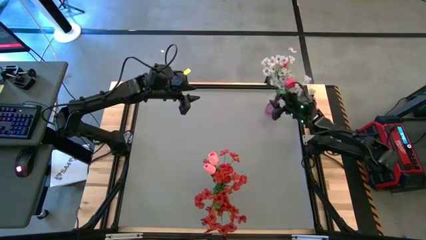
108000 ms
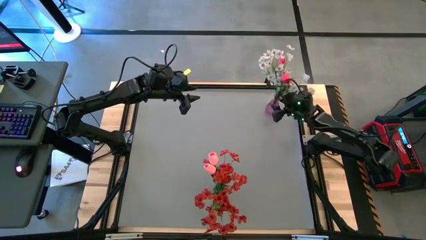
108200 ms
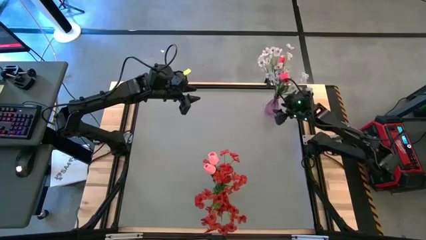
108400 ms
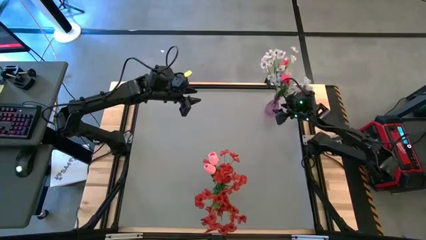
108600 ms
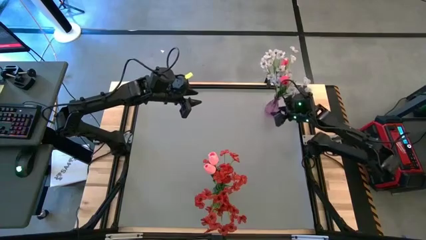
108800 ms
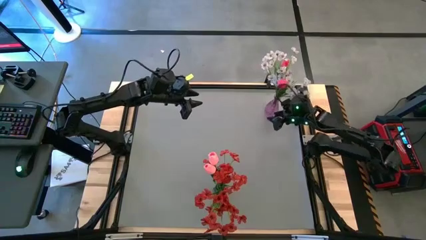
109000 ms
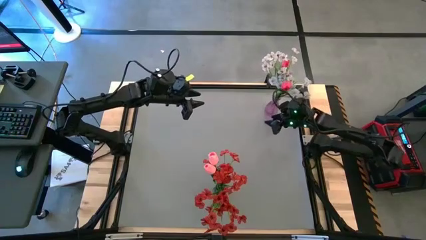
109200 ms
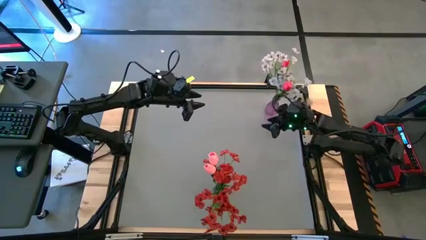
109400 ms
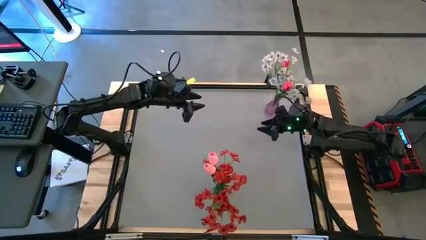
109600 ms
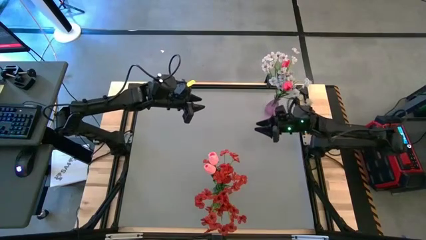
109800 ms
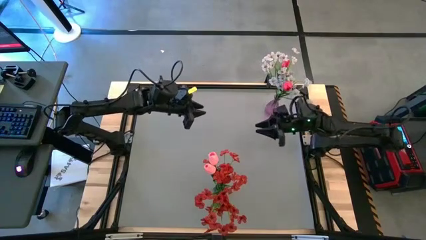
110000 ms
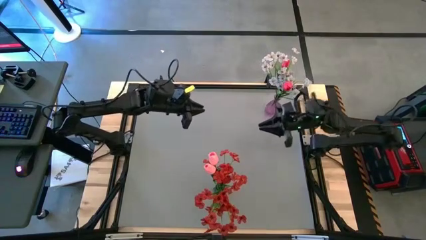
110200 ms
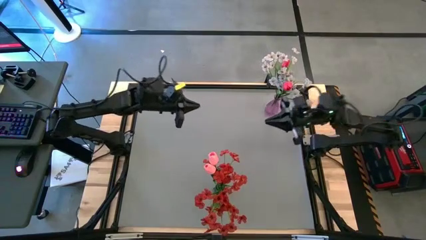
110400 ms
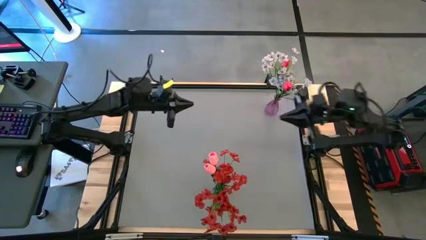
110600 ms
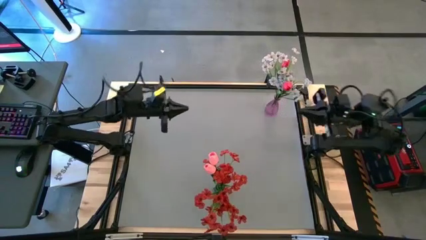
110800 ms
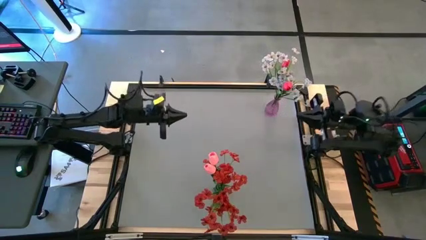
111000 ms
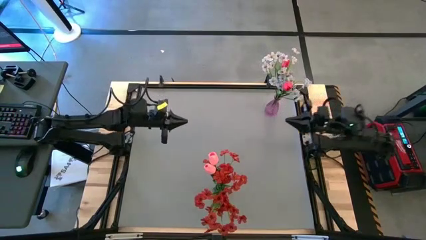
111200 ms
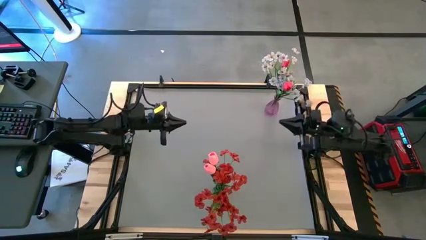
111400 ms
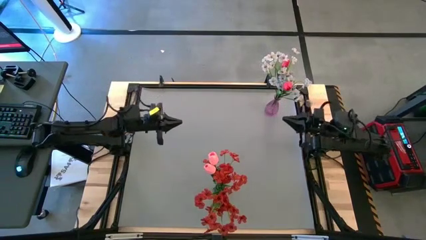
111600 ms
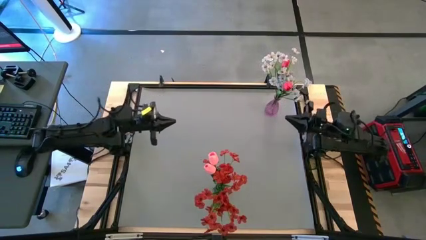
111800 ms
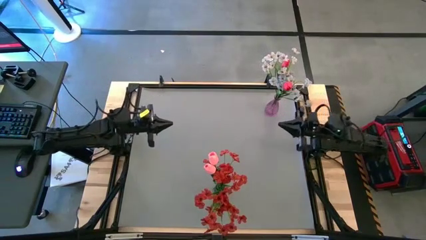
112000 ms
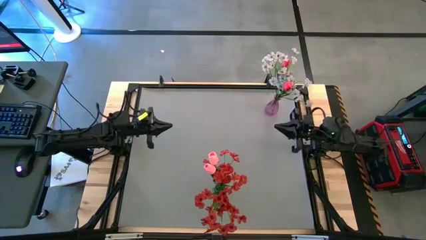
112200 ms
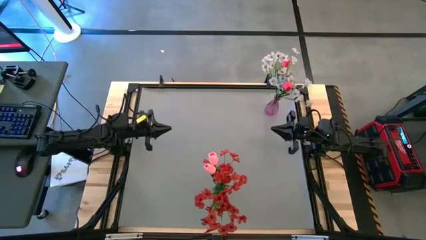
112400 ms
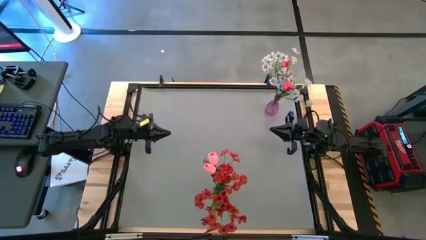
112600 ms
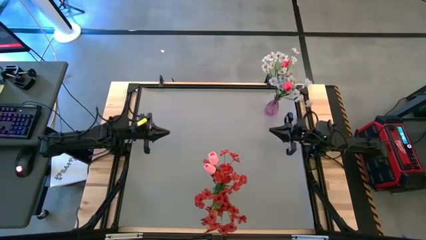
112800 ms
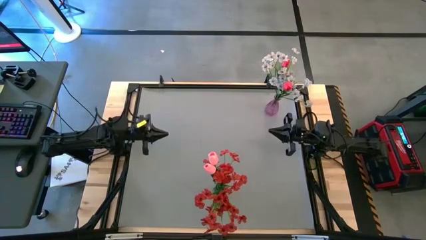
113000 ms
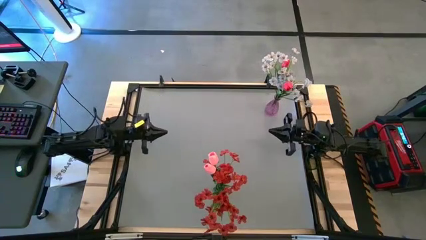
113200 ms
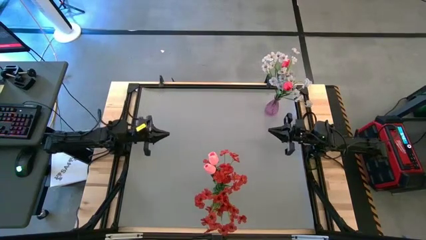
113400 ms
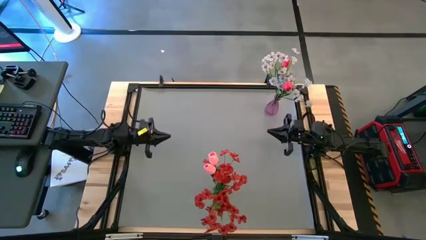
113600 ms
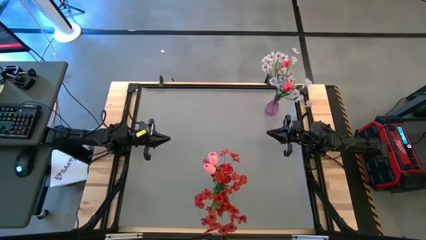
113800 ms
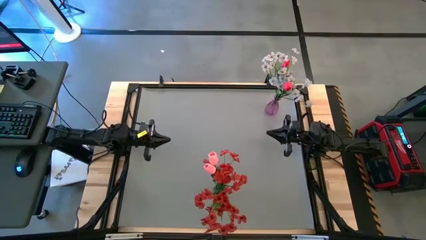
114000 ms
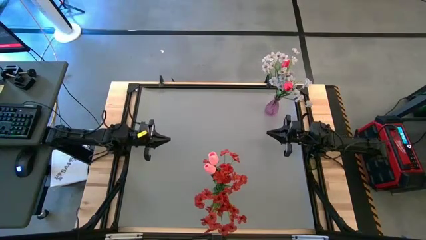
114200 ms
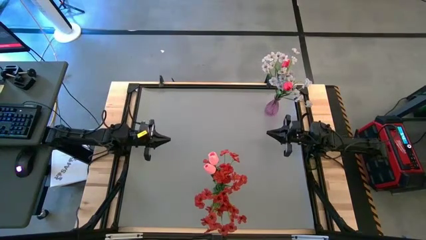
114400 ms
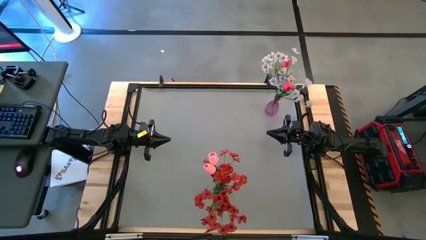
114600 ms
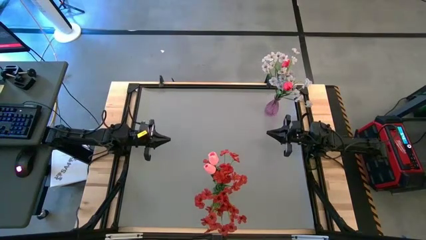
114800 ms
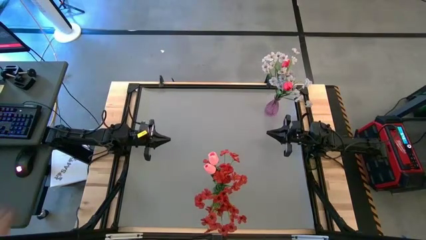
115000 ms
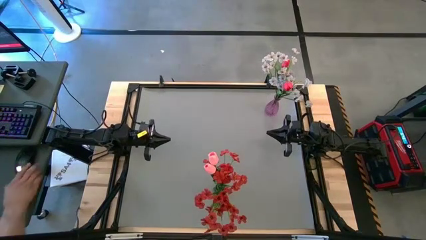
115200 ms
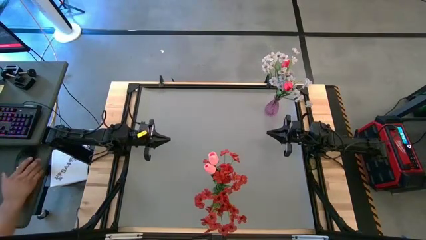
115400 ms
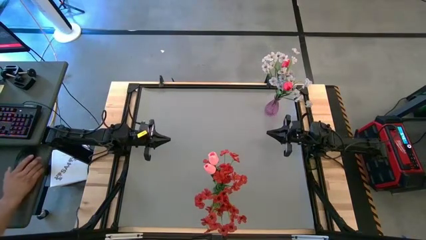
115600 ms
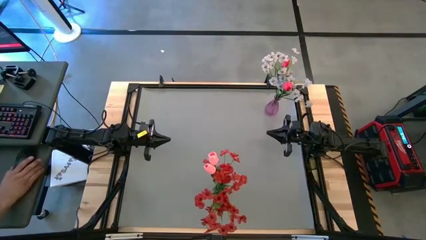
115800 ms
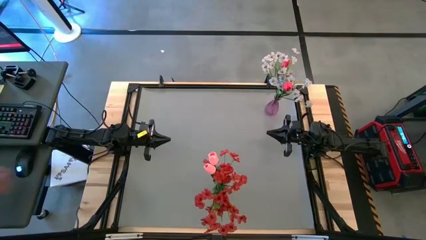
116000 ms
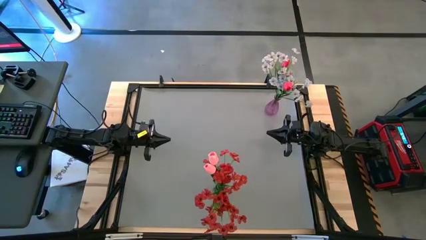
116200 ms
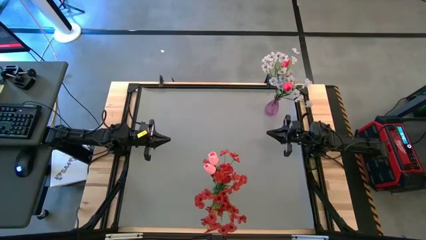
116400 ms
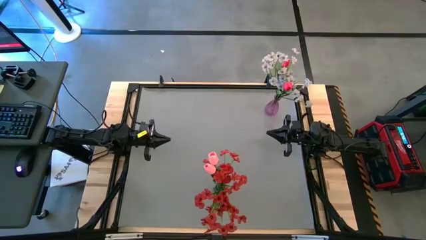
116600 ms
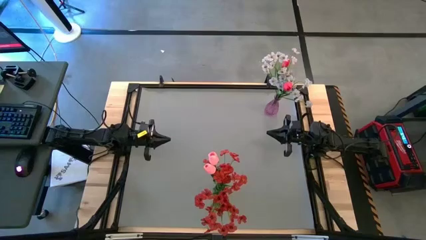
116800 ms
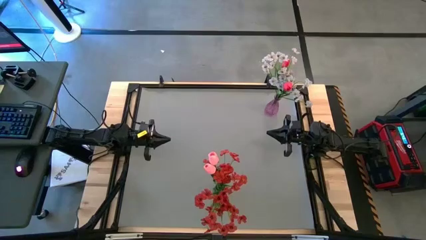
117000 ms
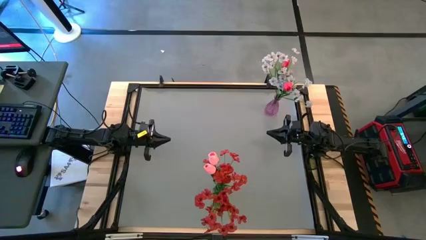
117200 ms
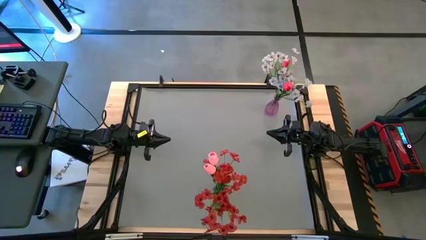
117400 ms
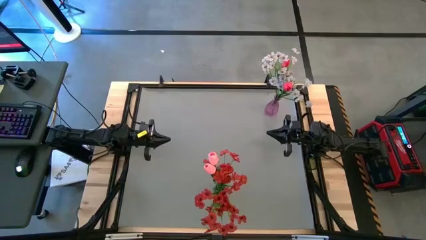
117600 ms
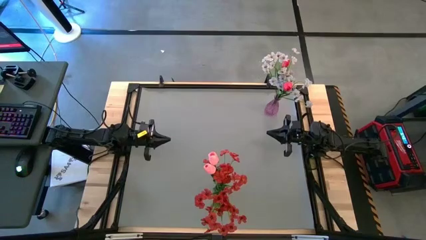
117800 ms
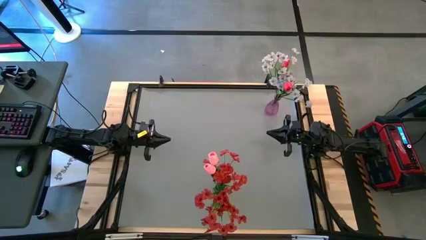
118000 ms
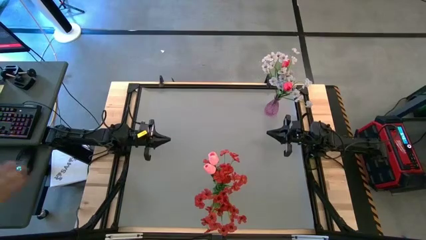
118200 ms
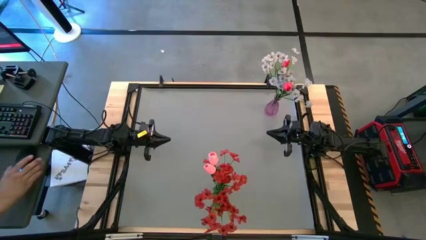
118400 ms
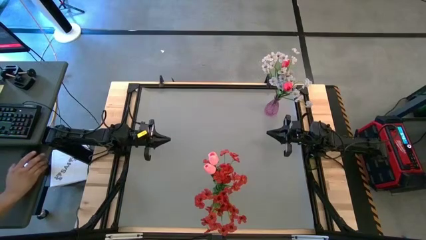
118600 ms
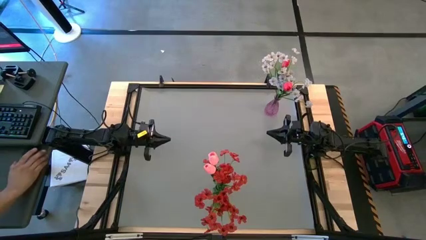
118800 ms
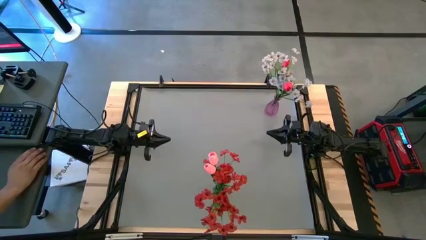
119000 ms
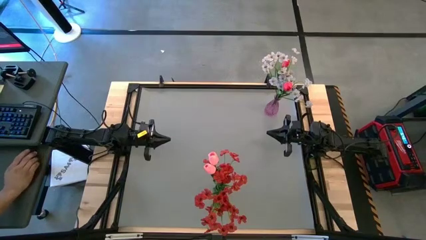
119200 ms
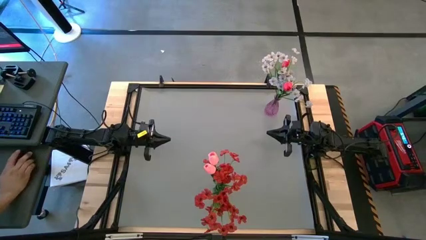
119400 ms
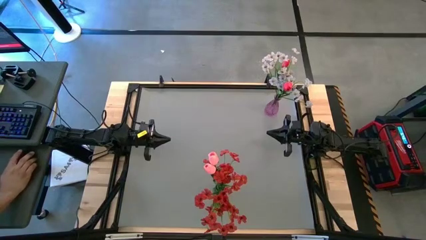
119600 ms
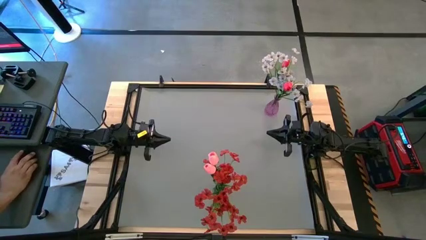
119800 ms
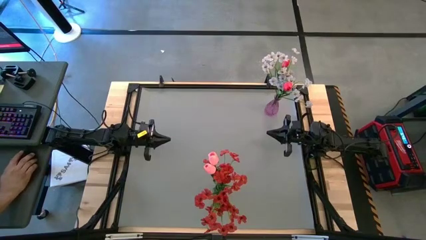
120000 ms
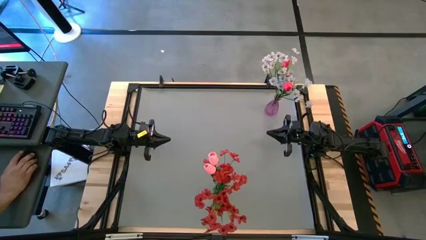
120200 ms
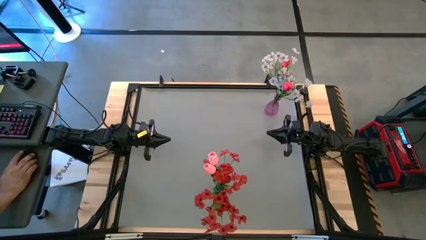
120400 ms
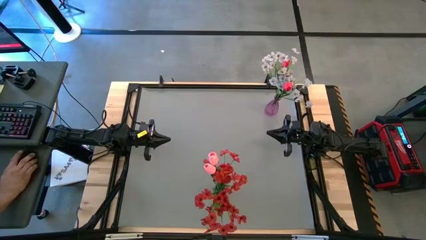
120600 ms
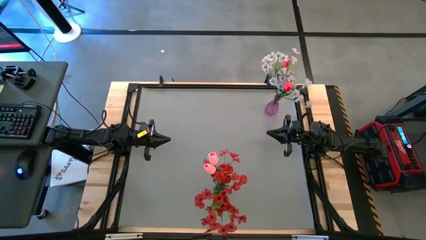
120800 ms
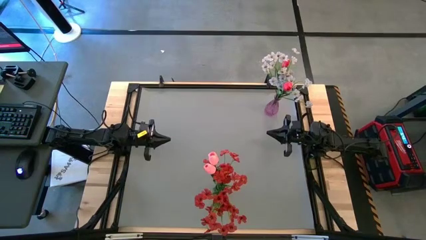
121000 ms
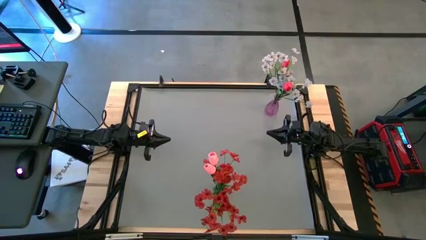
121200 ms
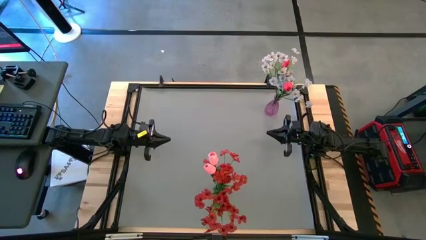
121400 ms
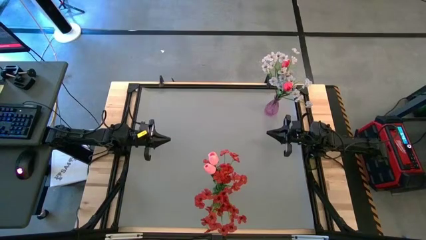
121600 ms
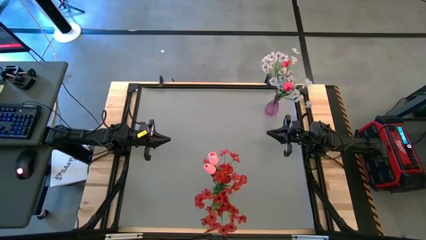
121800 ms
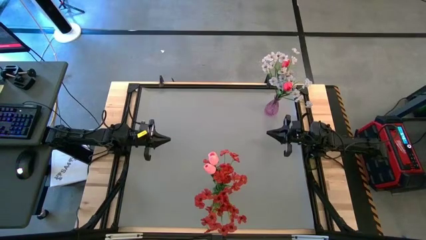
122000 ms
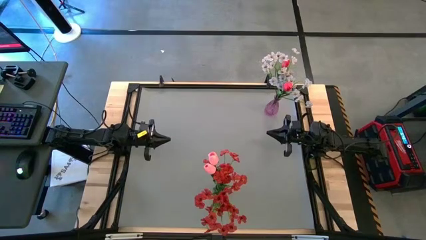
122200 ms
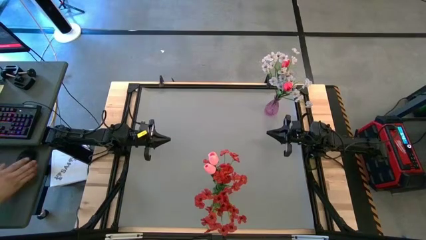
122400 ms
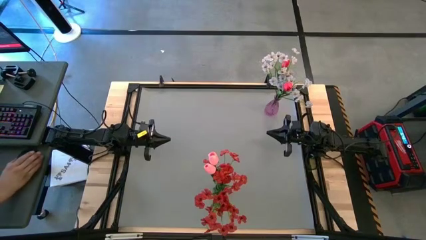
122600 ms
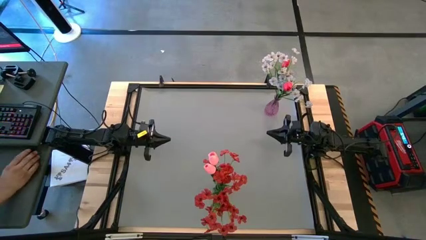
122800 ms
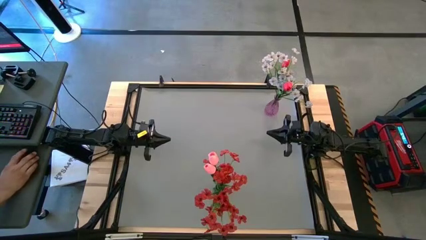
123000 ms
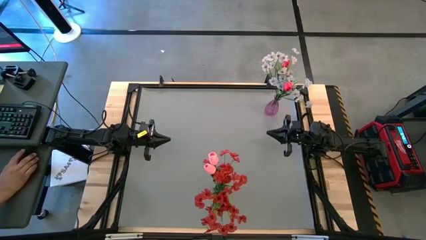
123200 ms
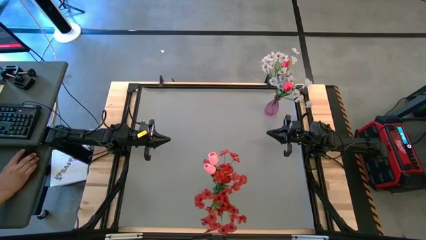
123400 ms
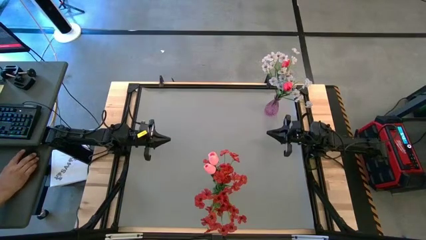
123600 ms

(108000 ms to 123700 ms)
Task: Sort flowers into vase by color
Return to Home Position

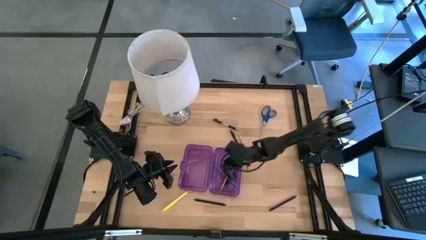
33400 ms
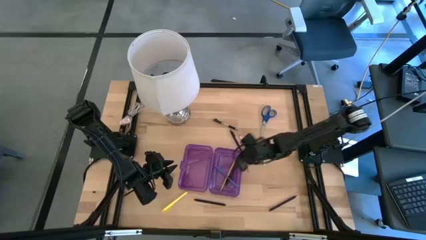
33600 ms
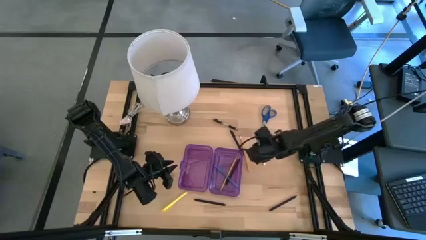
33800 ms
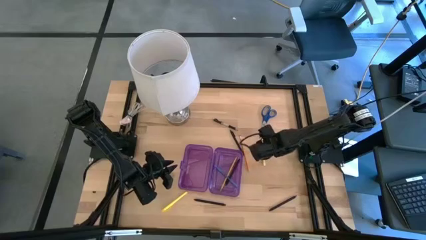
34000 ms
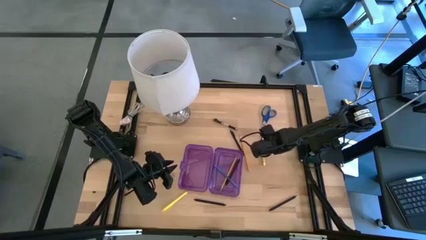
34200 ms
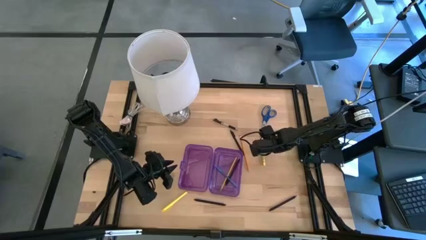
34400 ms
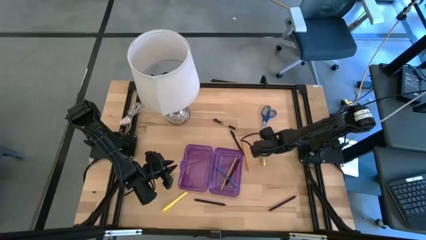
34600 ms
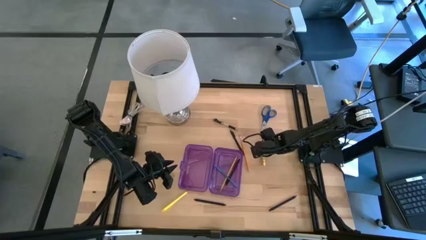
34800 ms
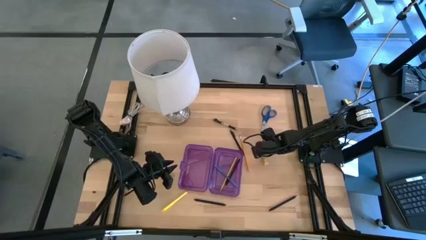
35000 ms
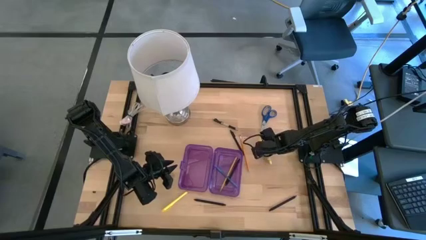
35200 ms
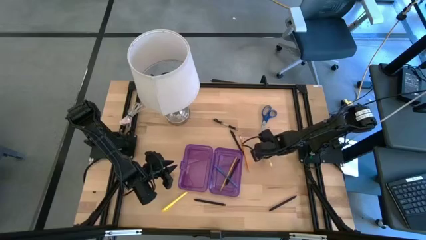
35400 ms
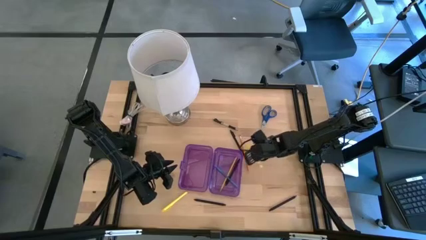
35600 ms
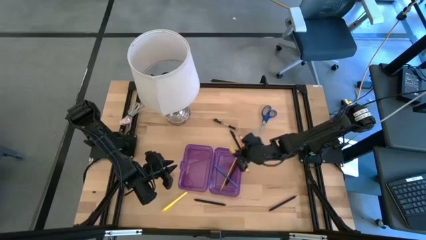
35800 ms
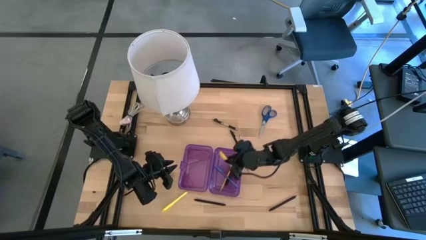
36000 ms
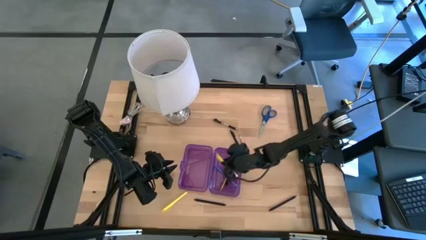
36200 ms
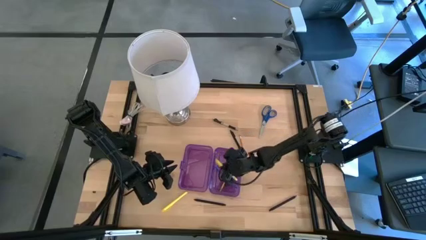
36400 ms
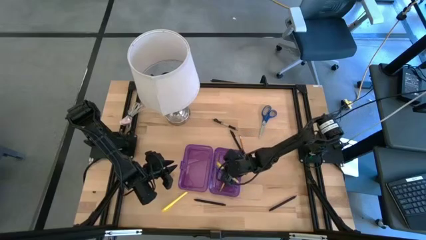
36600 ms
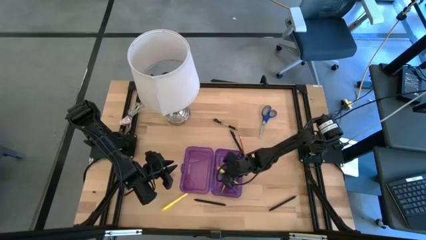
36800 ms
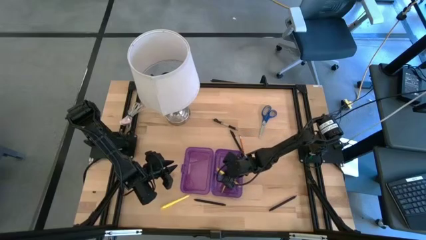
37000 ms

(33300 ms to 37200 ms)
Task: Pick & place school supplies into a supply box
Put the yellow pencil into the purple supply box
